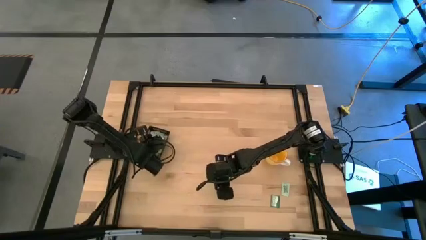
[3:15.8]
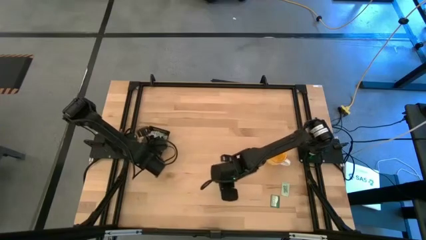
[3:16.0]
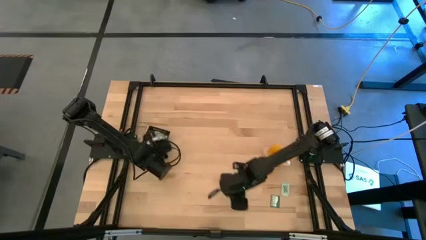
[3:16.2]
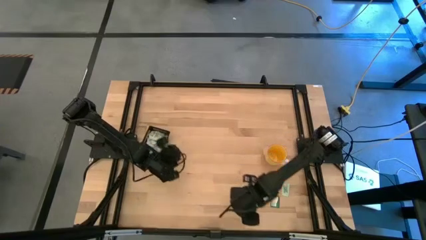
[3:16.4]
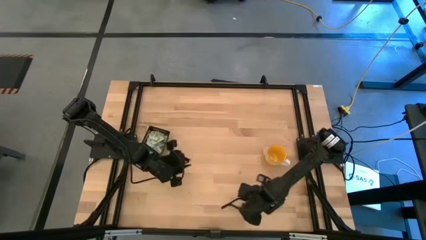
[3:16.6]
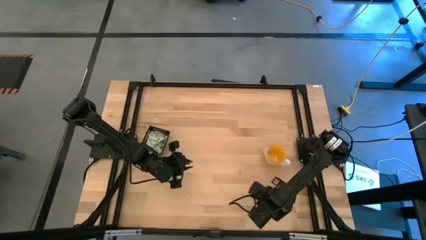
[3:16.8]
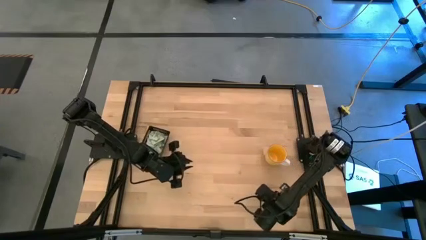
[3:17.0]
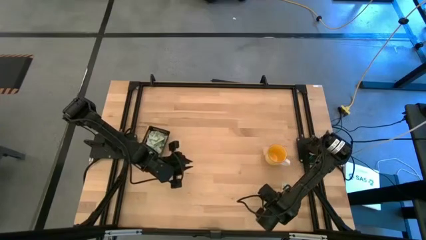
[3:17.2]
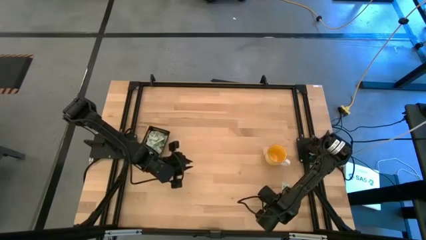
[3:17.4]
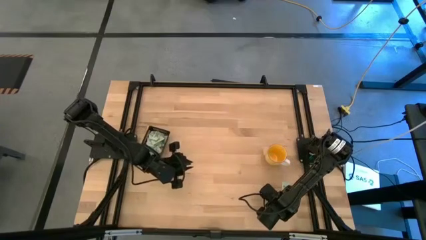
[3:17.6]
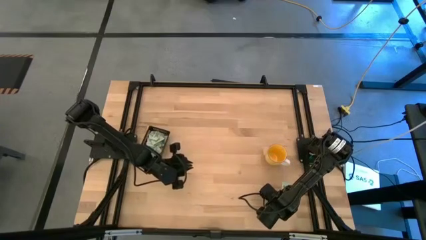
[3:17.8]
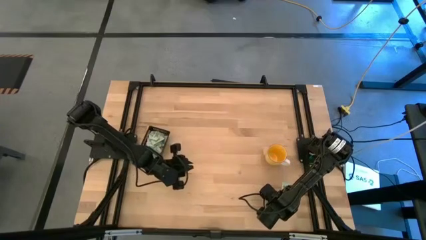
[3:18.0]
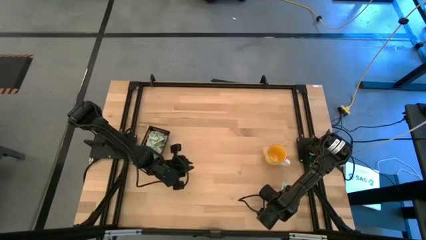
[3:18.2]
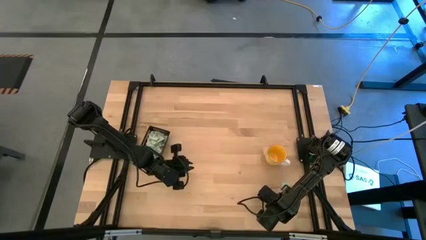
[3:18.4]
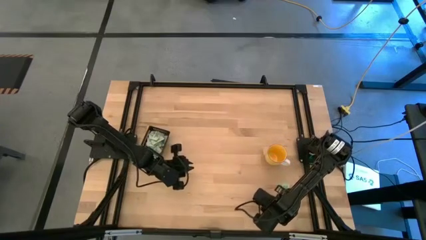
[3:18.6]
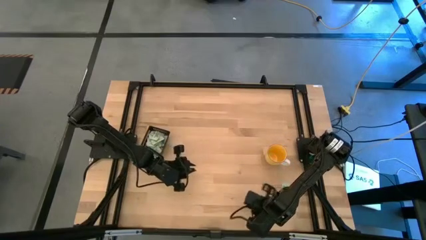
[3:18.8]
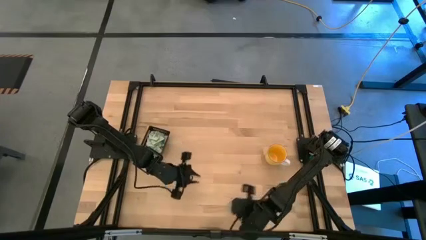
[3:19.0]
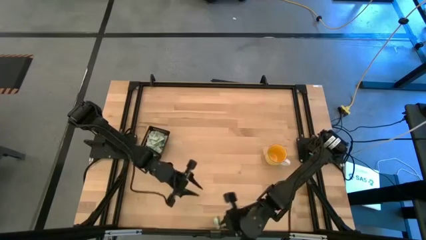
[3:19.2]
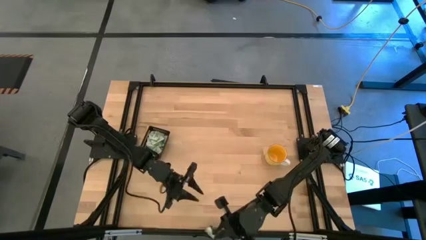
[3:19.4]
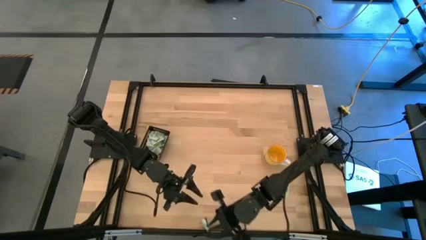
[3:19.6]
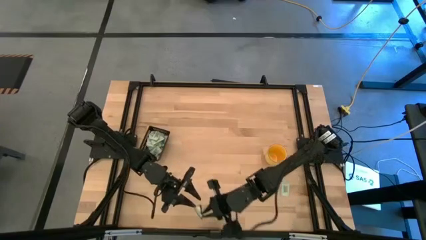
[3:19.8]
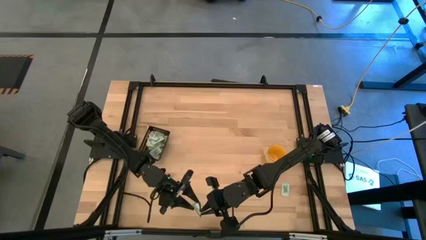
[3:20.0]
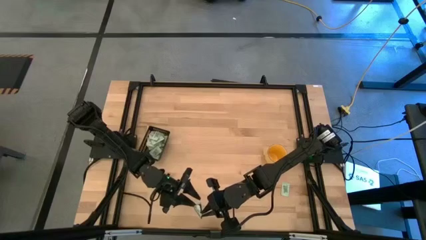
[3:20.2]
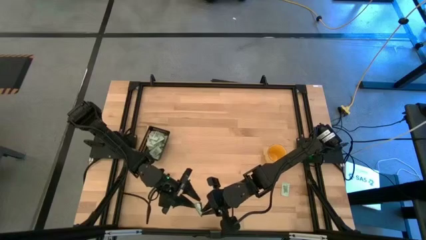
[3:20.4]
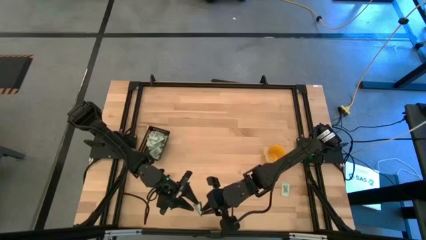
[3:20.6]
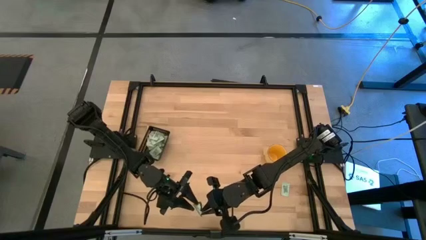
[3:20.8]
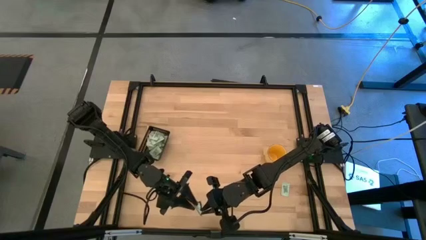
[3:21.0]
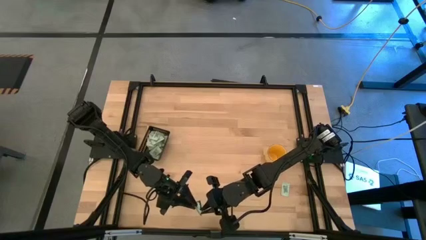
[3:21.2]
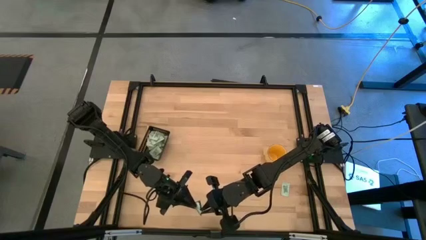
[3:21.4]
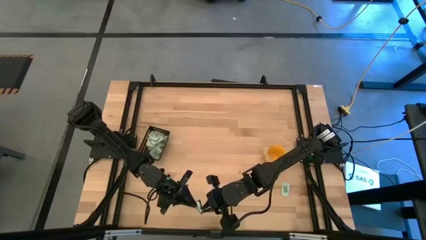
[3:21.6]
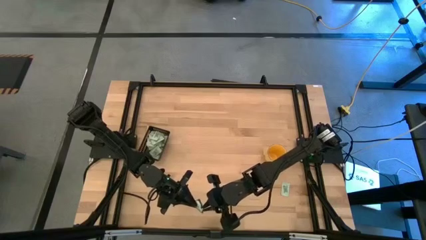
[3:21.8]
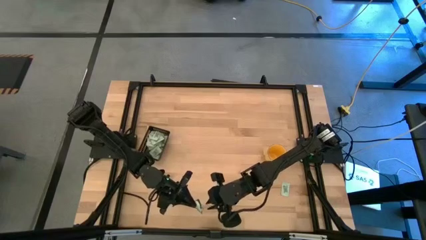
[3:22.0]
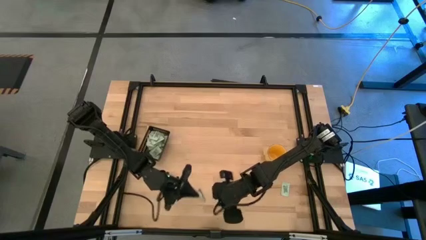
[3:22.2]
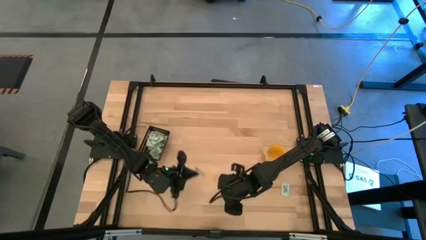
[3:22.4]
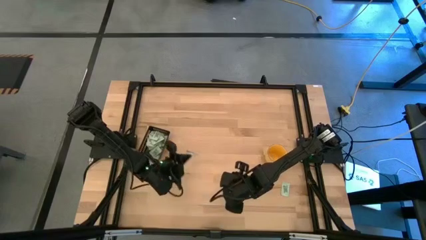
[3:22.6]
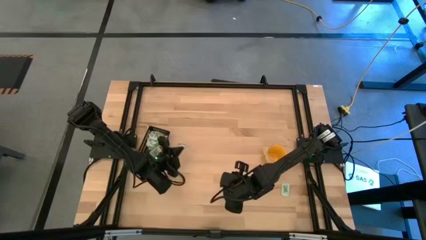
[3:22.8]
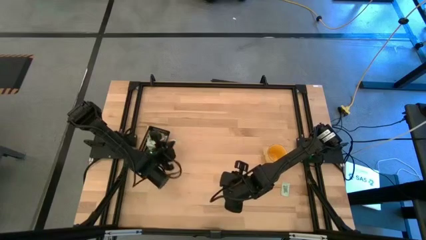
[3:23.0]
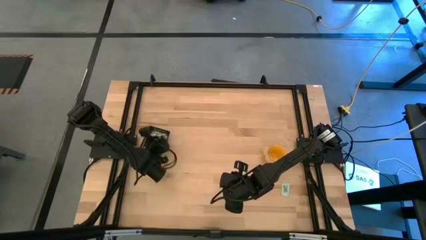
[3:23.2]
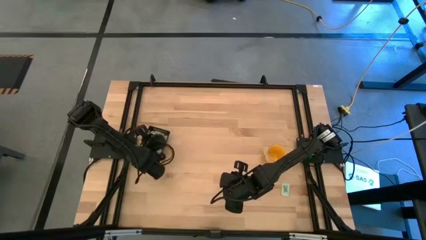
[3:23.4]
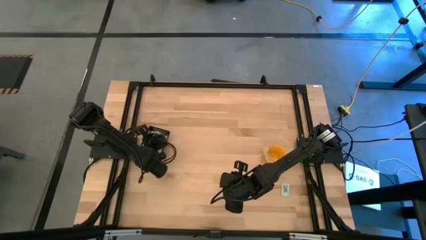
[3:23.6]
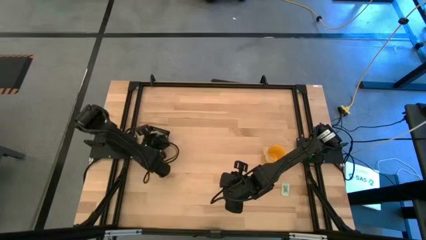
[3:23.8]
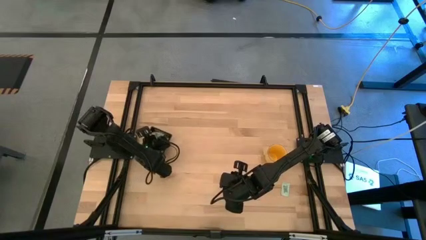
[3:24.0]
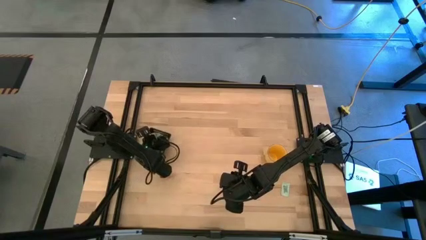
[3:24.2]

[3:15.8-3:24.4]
Task: Pick and place Stevia / Truvia into bins
Put the truvia packet into the black bin

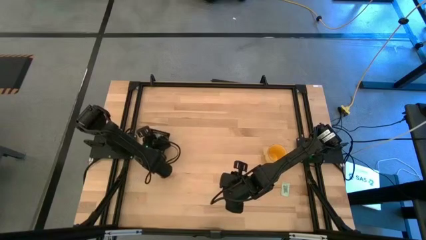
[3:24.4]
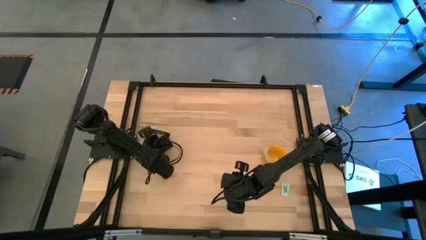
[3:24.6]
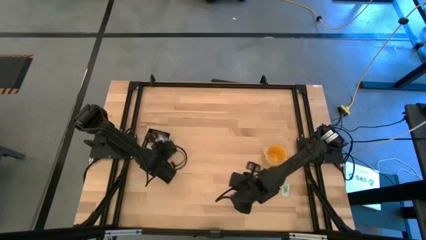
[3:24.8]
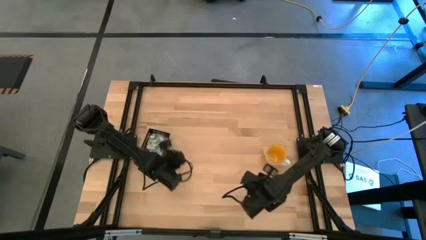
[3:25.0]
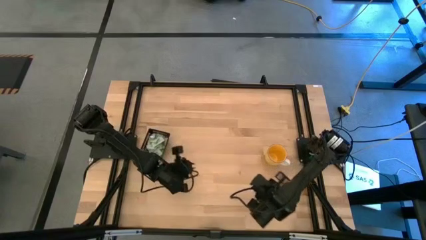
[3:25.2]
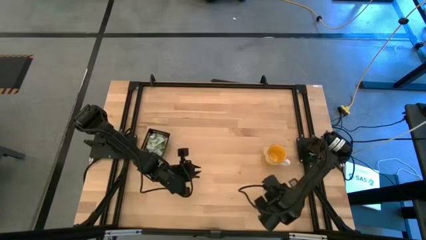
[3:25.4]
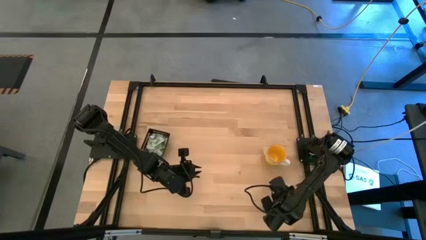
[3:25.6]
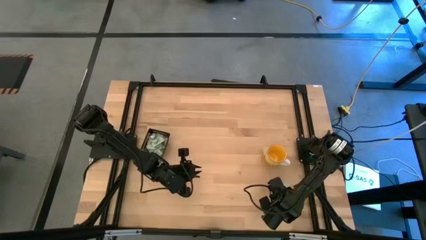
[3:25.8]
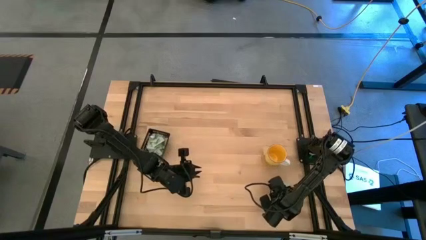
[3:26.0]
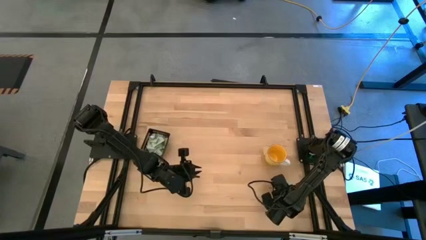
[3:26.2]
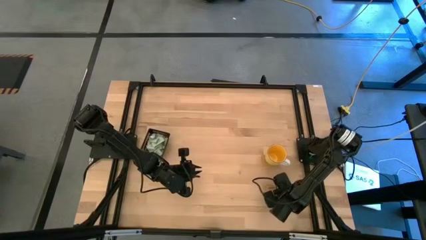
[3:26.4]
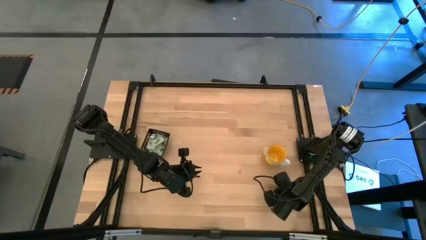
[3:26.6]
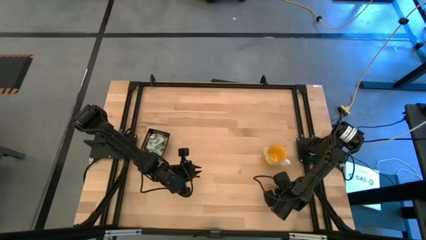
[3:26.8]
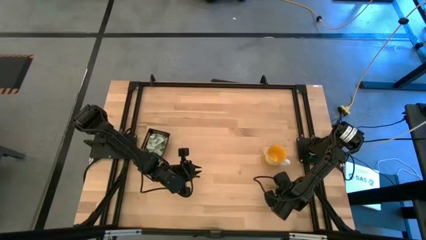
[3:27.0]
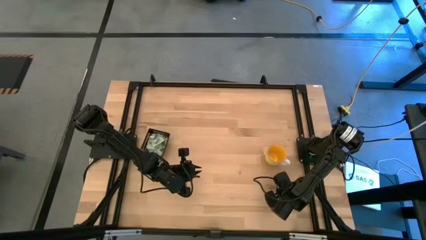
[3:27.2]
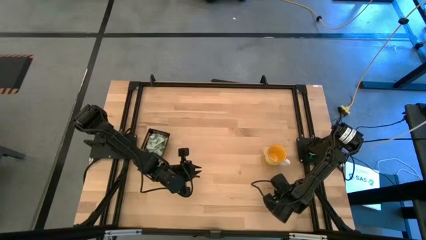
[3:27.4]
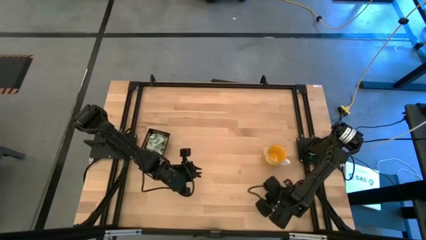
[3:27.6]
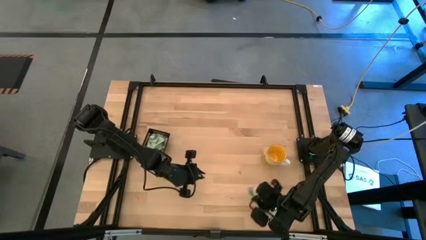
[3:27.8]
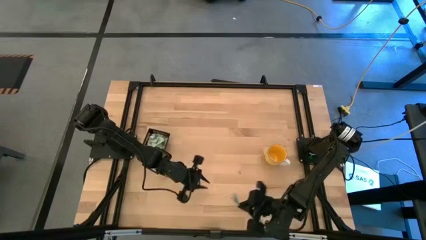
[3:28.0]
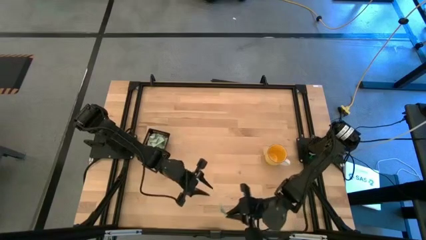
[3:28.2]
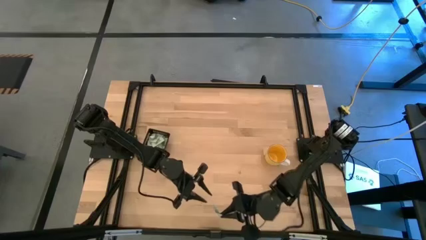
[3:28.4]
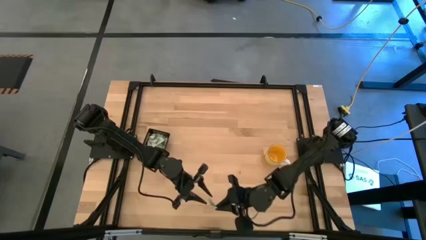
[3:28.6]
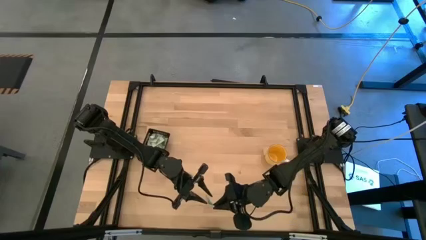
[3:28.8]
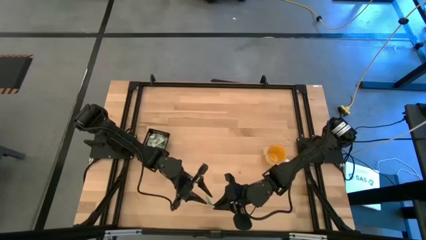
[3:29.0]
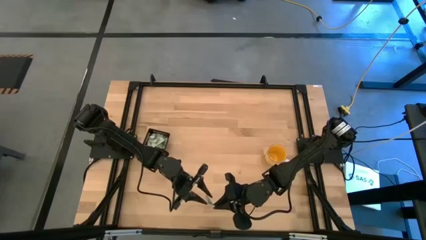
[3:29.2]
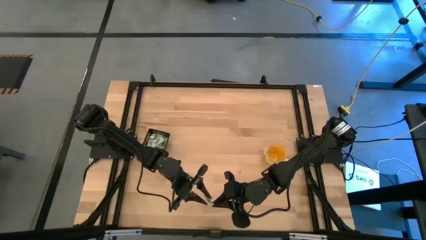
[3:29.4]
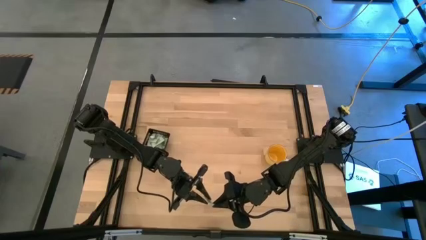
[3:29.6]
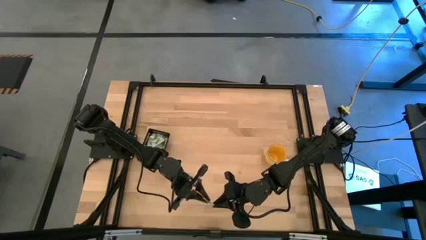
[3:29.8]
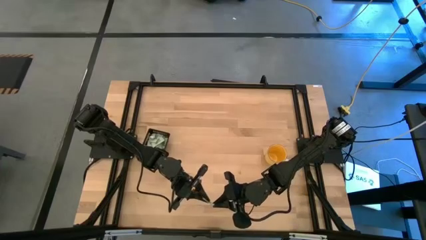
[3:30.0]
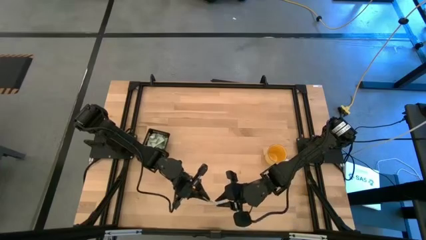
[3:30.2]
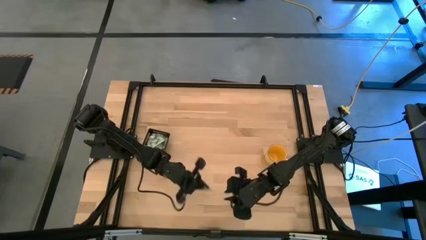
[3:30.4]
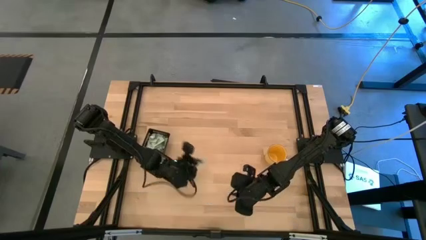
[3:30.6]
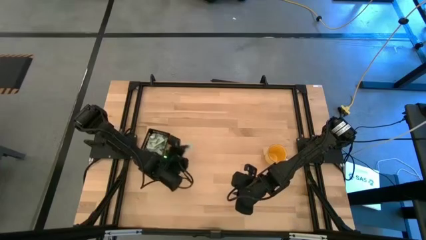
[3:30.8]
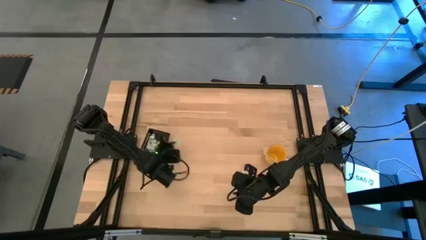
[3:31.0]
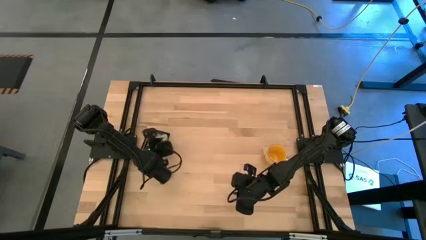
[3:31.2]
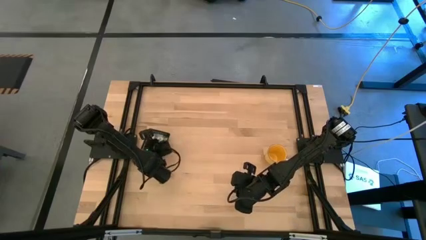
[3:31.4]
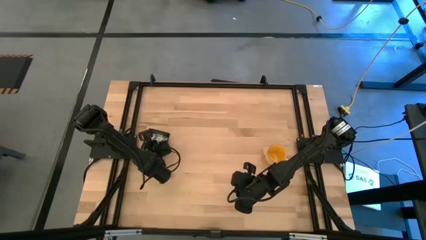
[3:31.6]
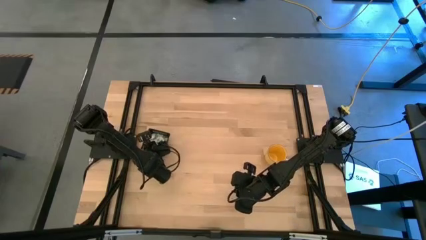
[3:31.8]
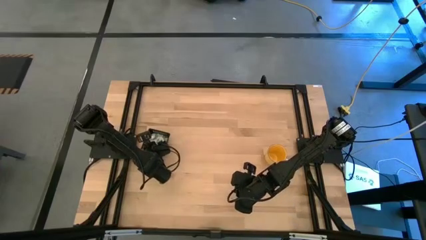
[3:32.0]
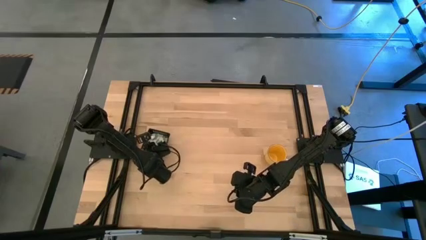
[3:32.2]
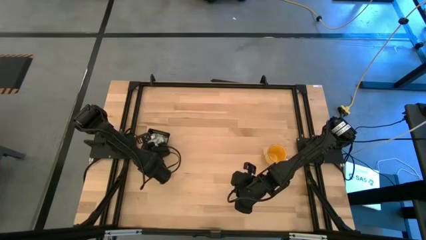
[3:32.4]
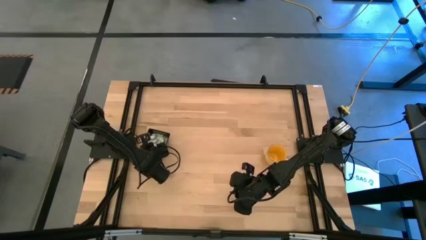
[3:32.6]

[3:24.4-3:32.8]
Put the stevia packet into the black bin
